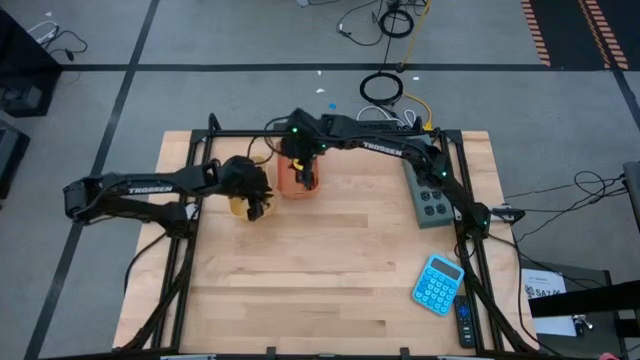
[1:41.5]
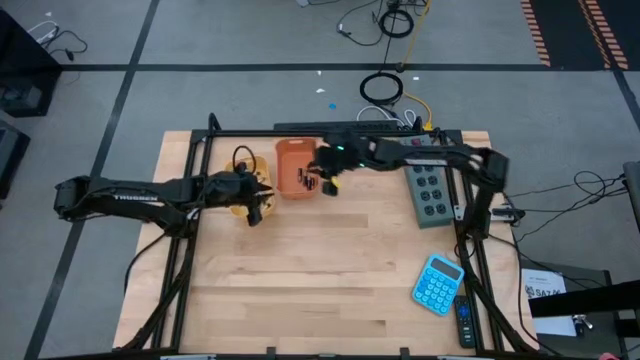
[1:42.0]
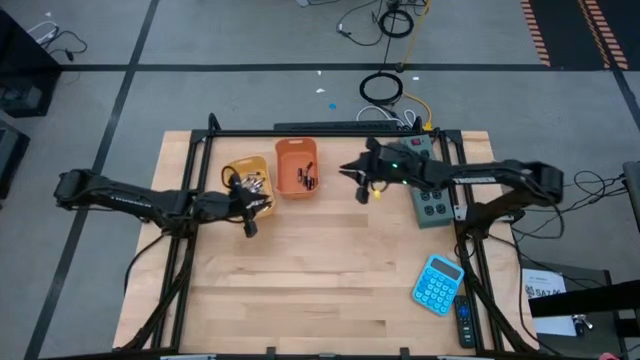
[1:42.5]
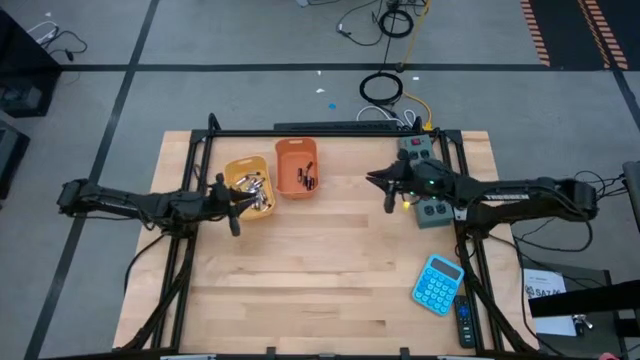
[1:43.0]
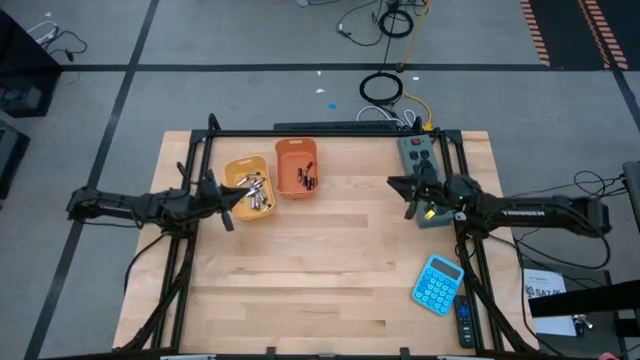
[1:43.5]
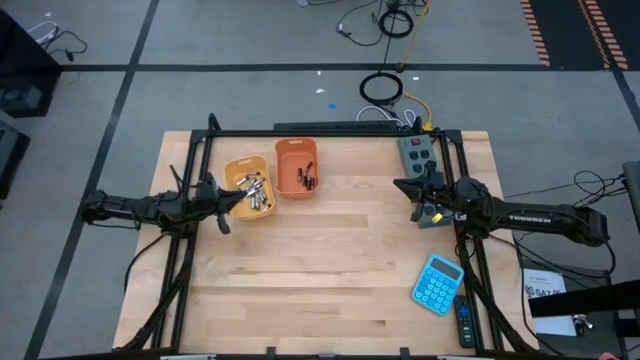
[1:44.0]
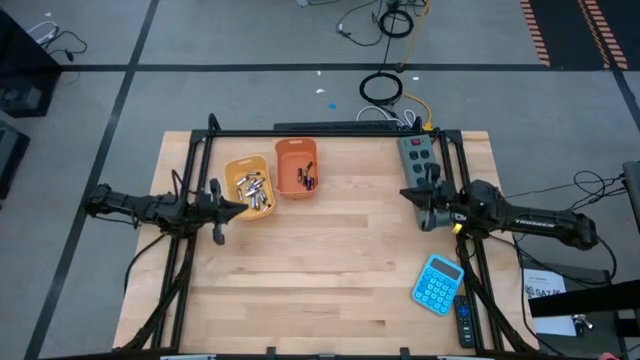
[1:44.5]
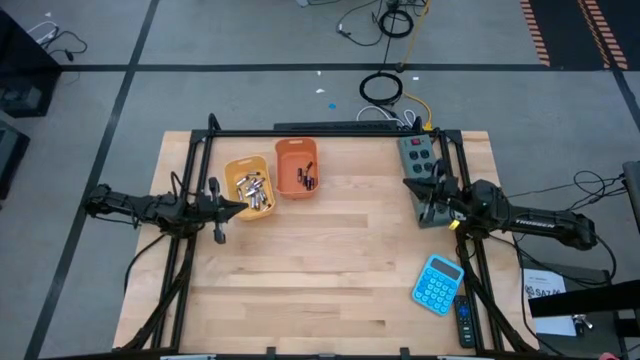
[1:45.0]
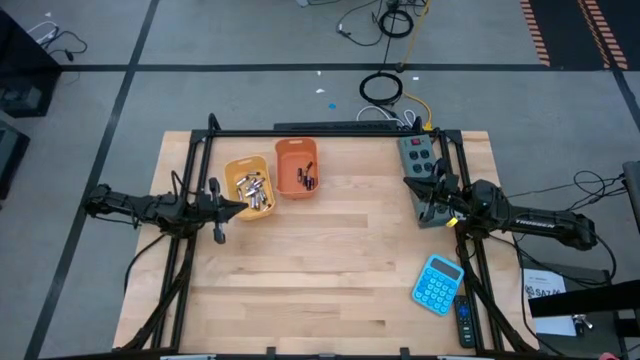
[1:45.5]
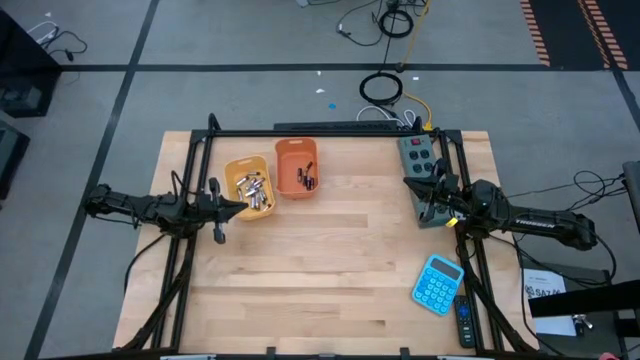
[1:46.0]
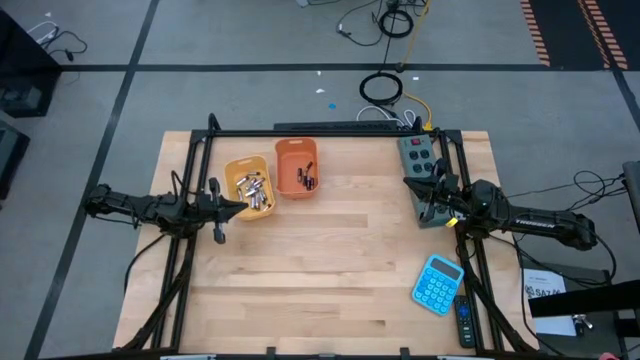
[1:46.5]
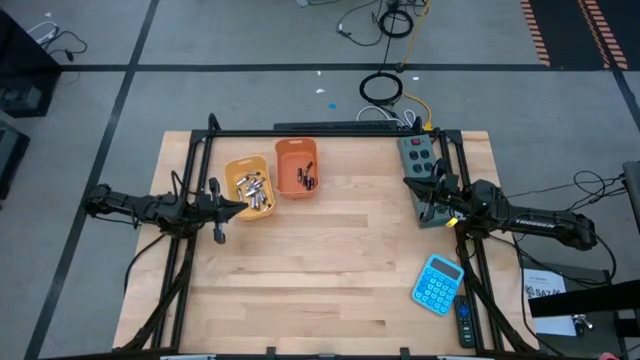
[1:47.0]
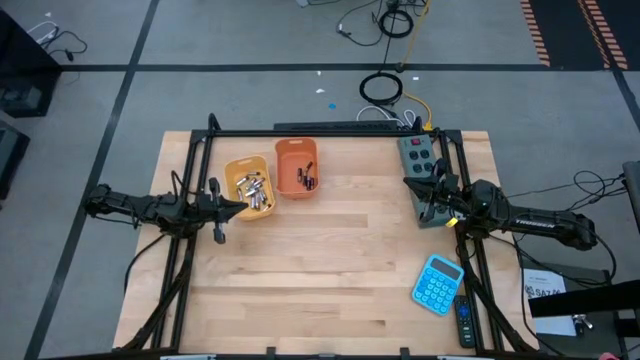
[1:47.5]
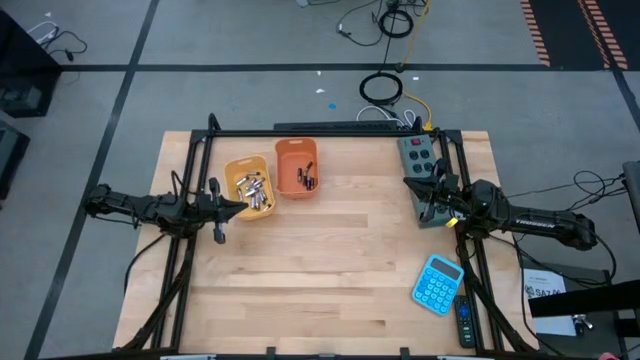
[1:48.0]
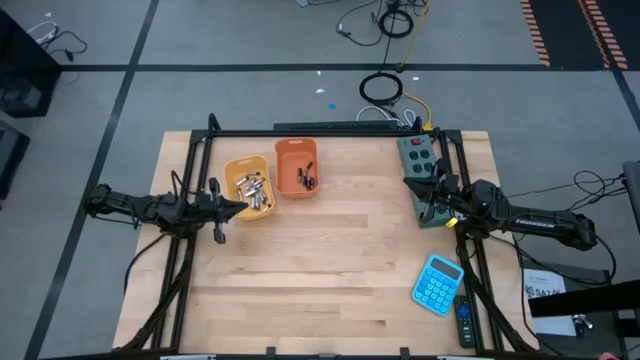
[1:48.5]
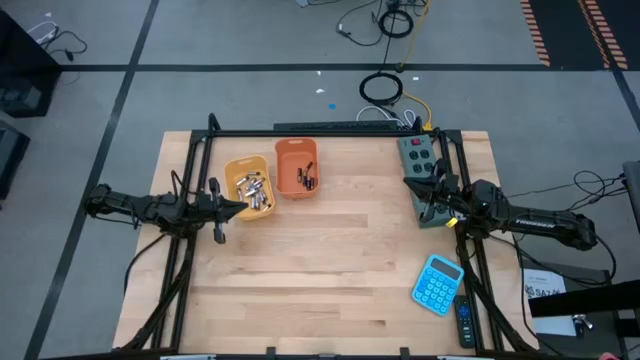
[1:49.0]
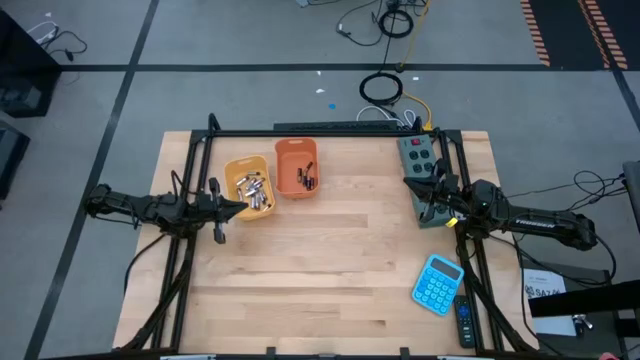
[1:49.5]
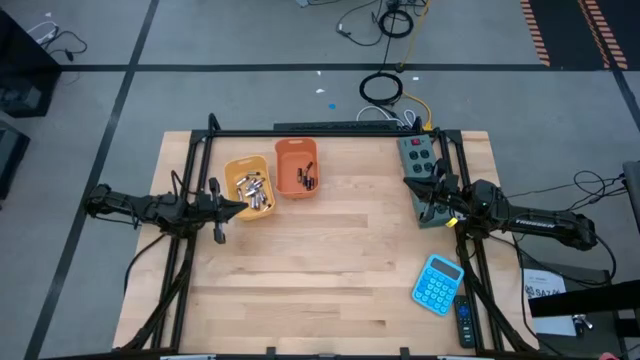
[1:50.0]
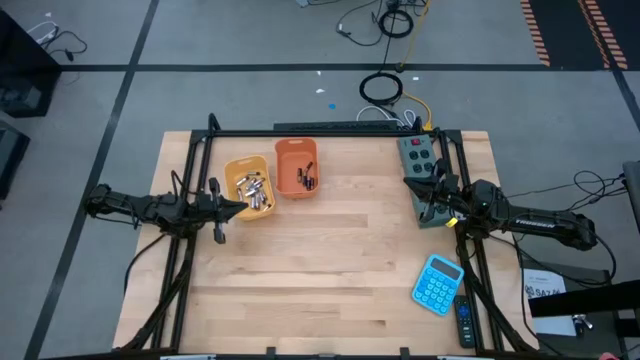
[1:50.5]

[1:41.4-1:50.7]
Task: Sort batteries
Return to Home Position

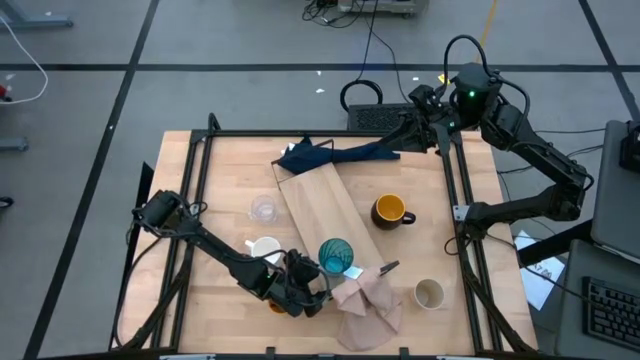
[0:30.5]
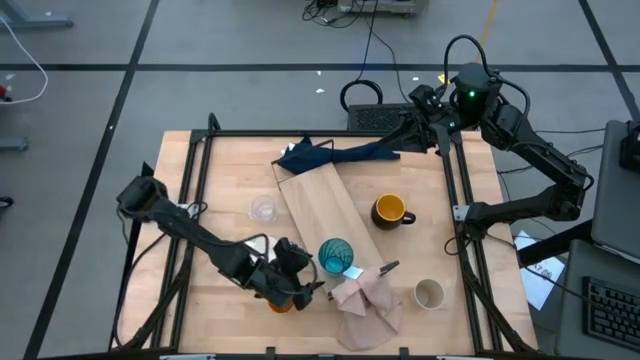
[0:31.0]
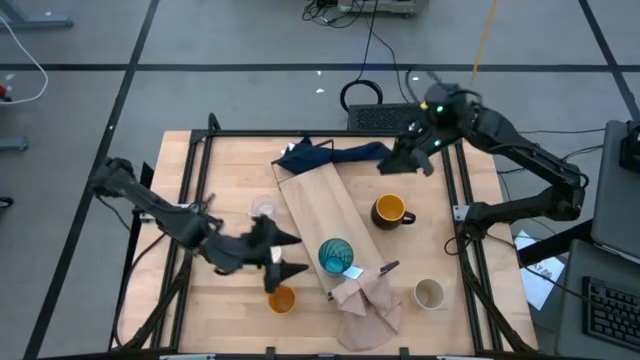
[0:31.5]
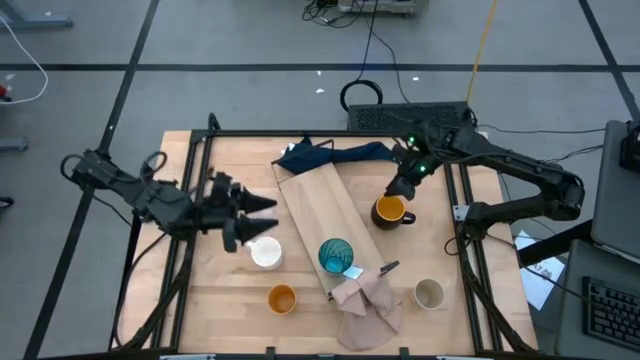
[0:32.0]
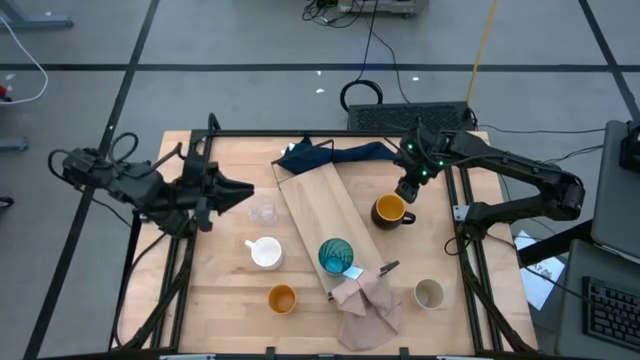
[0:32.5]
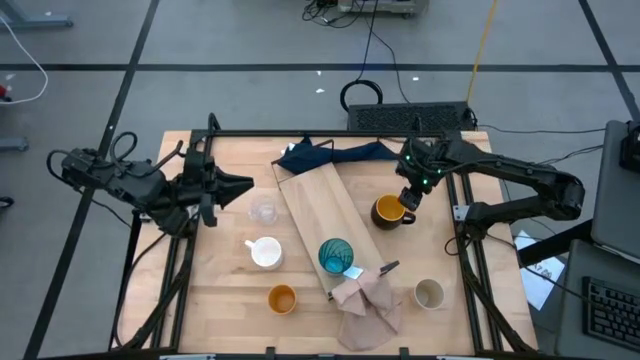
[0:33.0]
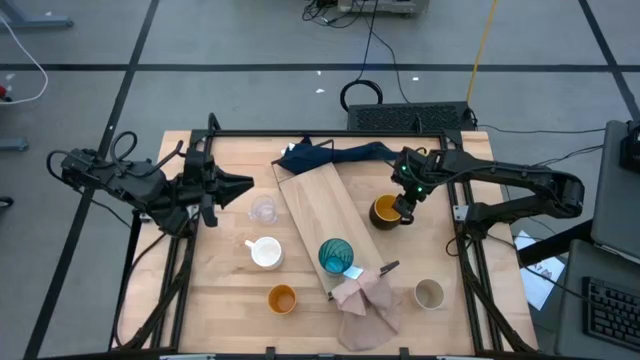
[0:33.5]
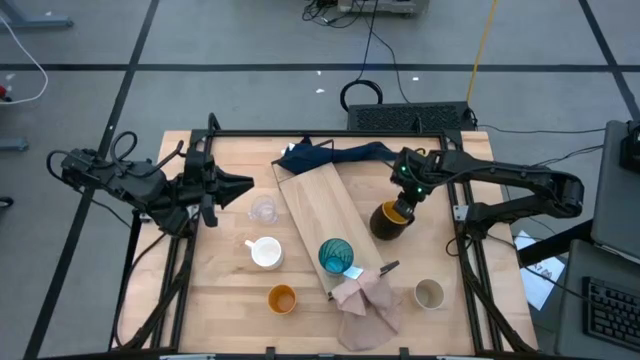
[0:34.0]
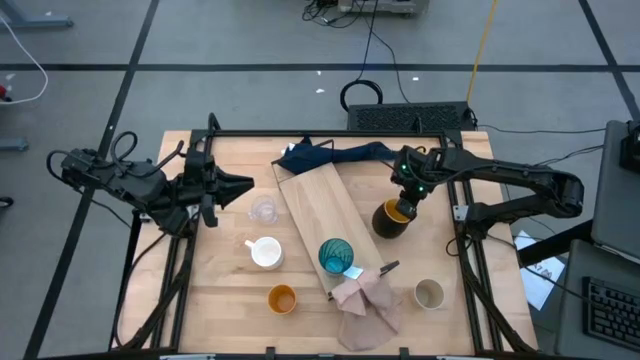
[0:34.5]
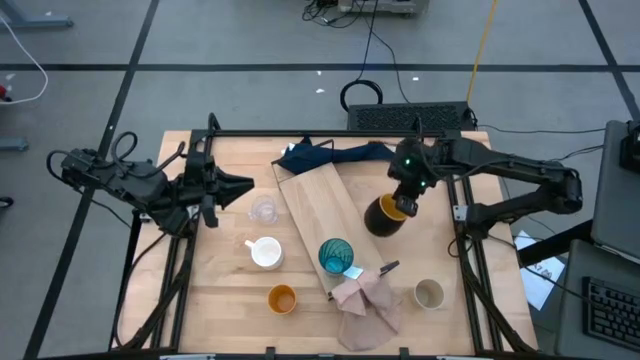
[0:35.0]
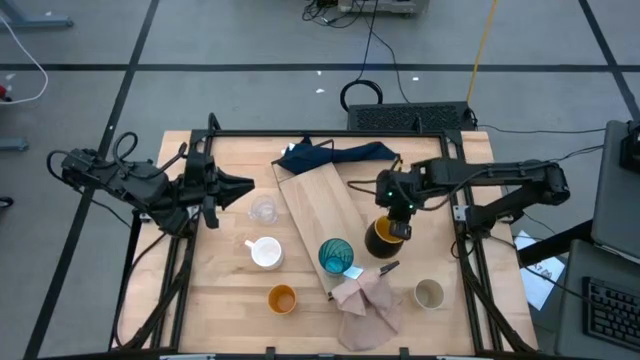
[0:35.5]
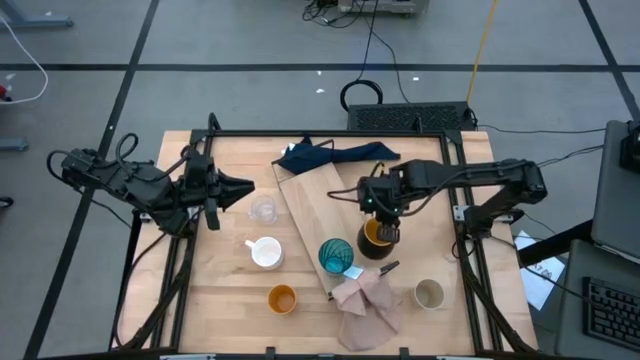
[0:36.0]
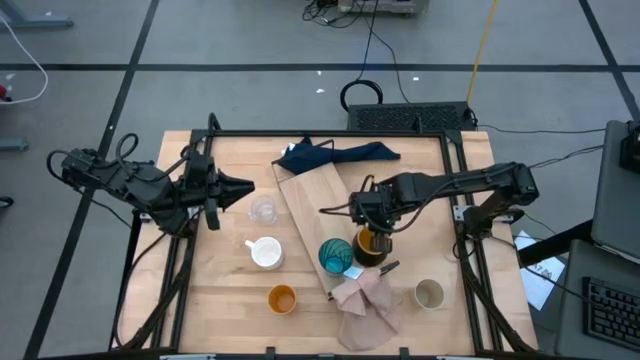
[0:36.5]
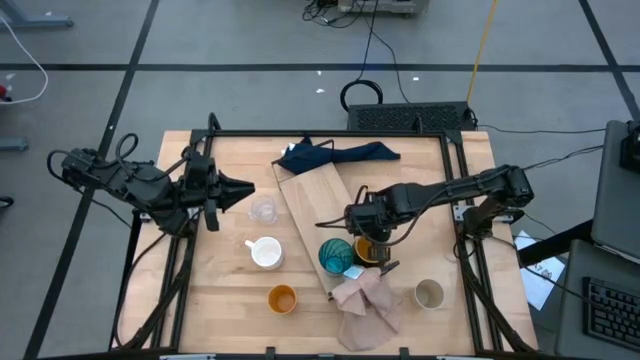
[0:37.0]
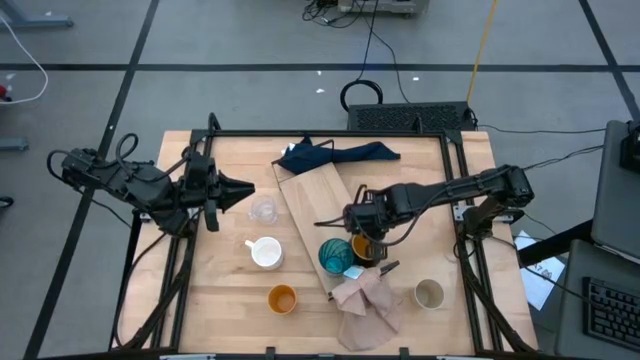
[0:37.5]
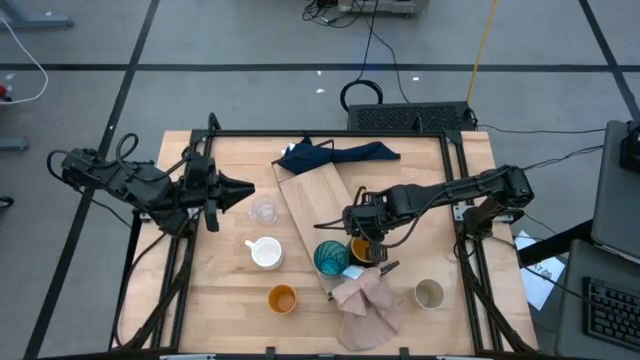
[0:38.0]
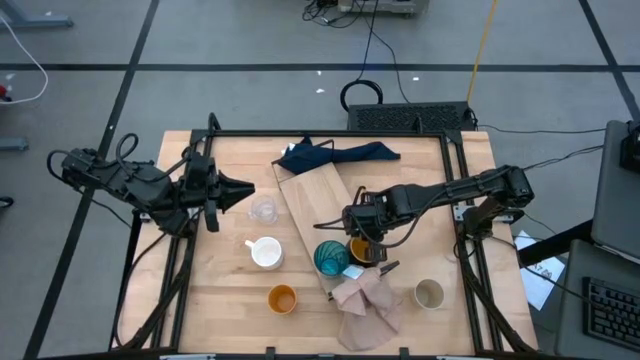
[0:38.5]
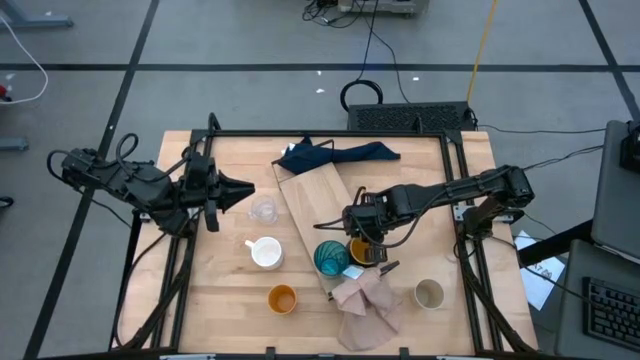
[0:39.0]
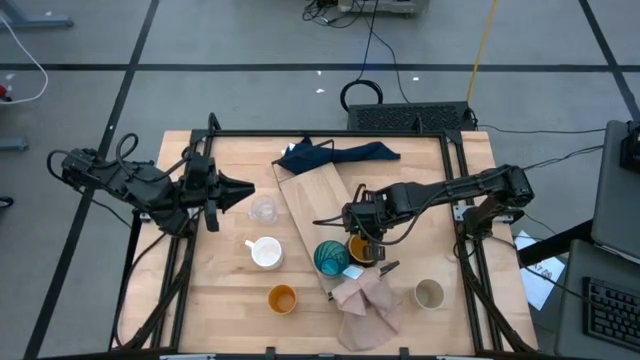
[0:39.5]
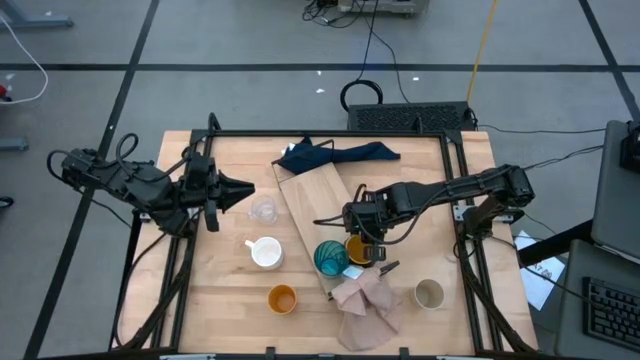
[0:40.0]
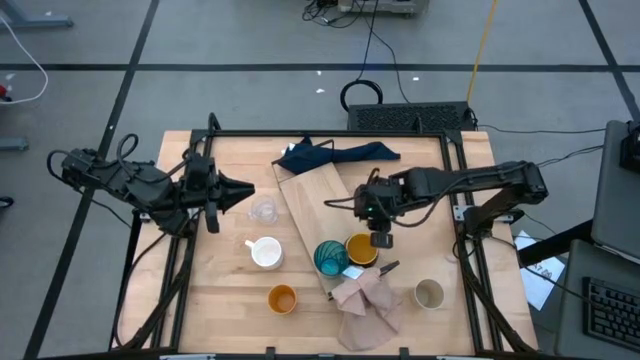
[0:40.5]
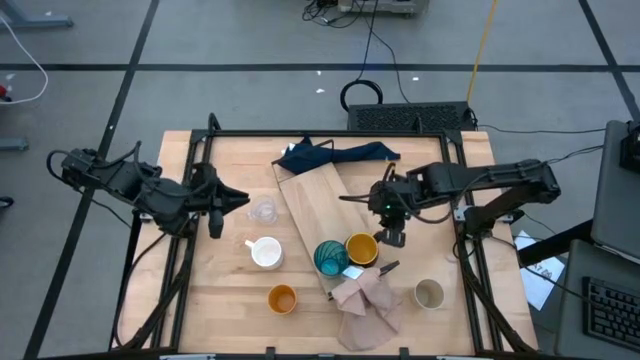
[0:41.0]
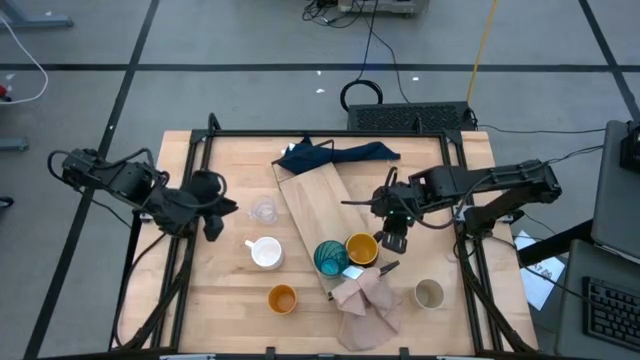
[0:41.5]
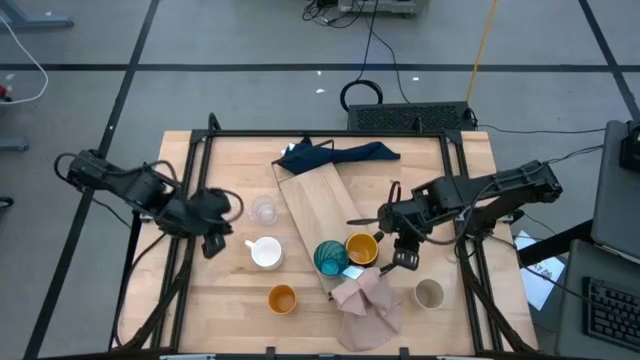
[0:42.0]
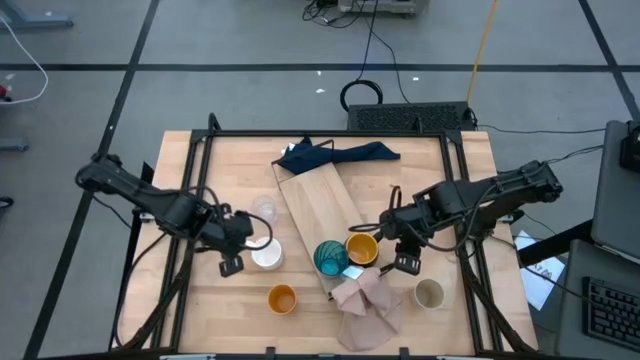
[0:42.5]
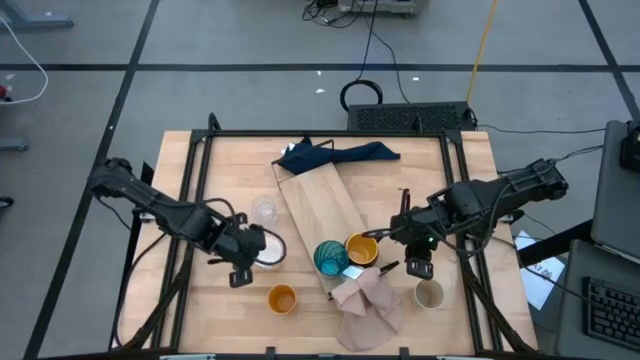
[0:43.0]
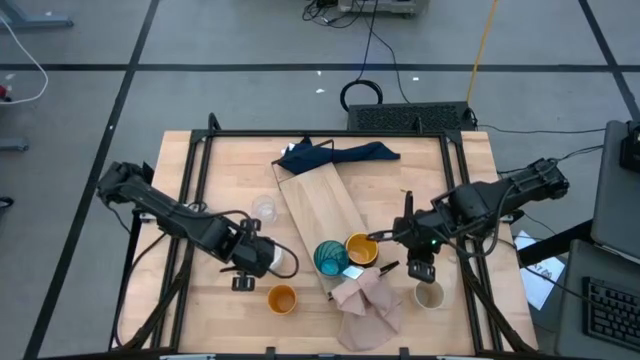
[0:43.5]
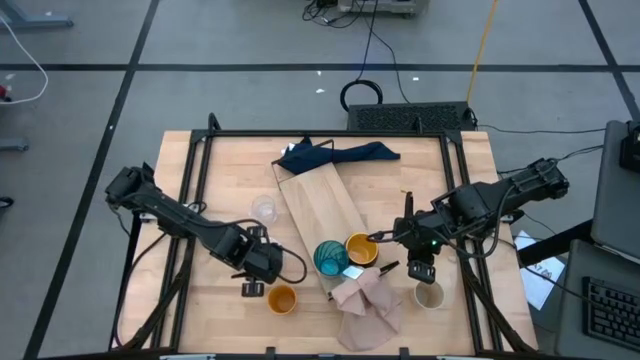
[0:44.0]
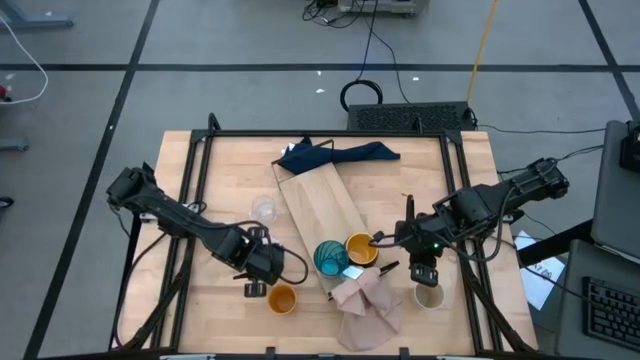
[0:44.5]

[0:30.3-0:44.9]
Task: Stack small to large cups/mugs on shelf
Put the black mug on the shelf
